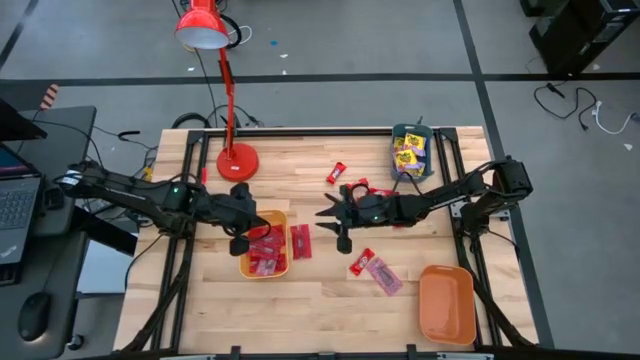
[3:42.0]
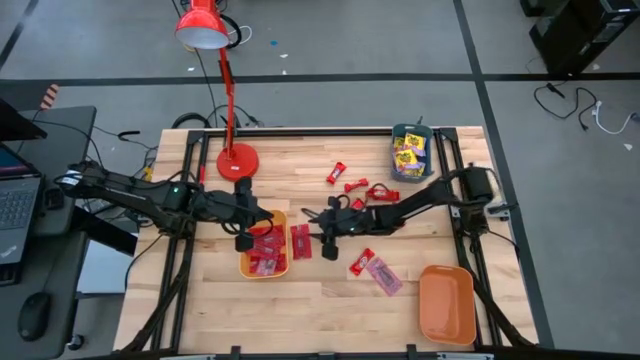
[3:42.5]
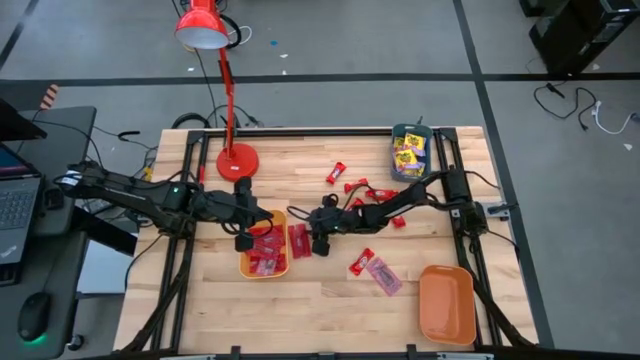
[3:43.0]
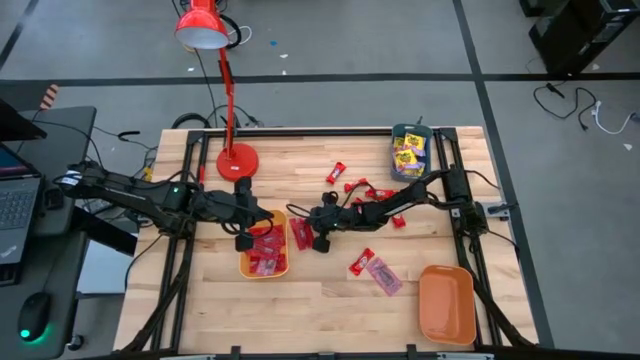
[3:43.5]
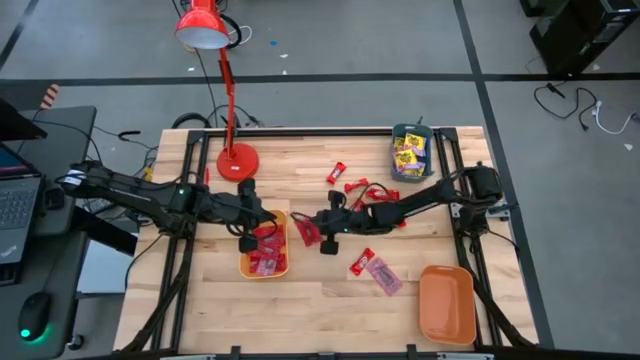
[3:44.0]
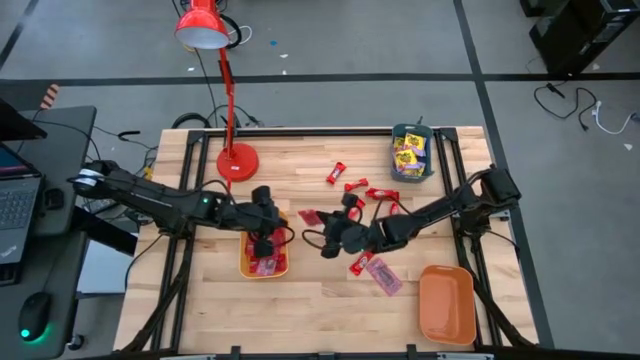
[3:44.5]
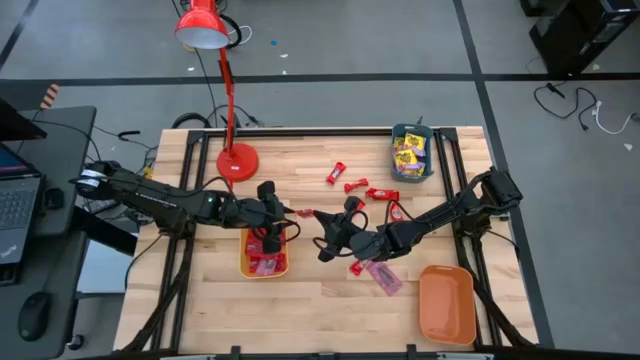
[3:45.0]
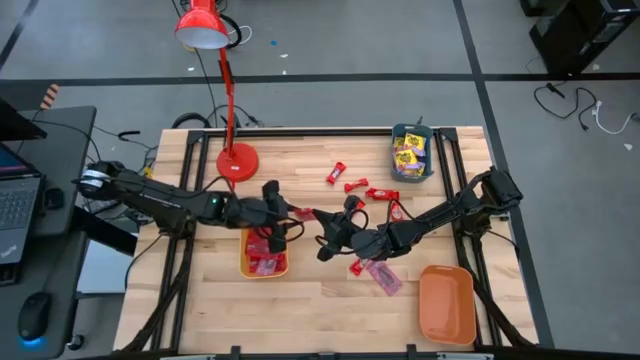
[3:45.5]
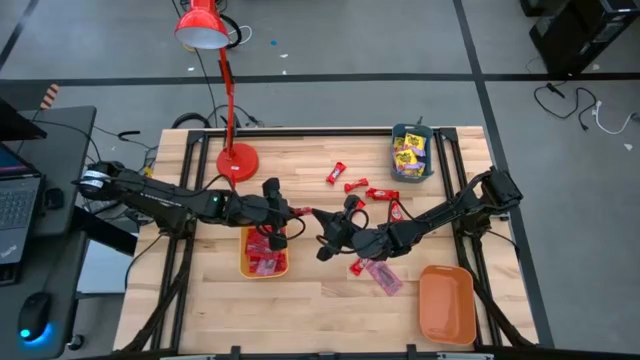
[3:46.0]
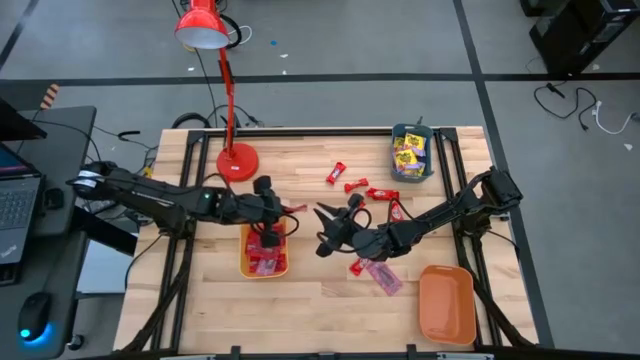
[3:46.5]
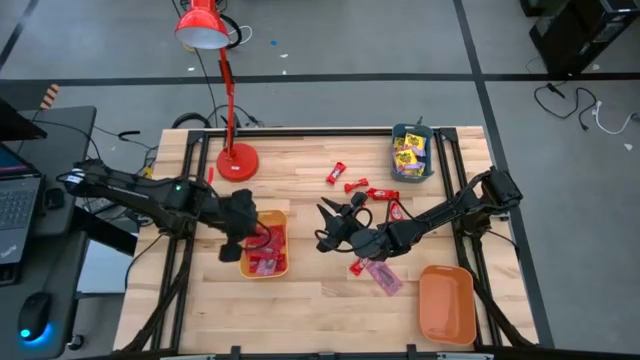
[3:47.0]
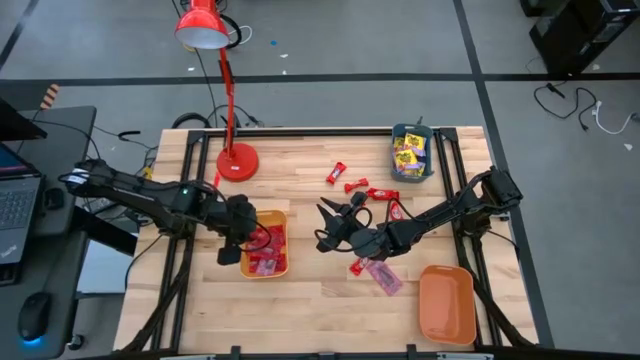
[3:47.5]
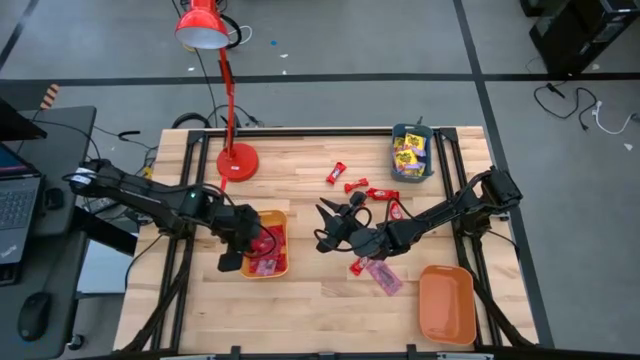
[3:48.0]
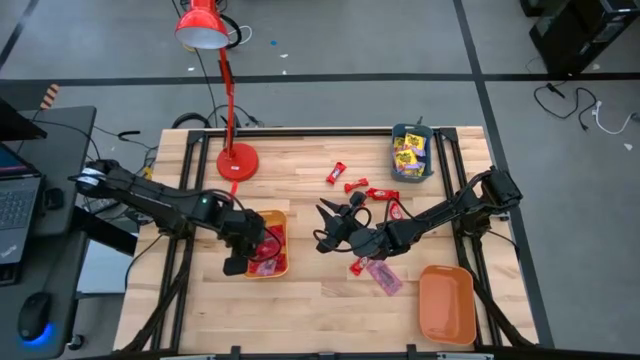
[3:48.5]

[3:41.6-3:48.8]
Task: Sort candy
Put the red candy pack into the yellow bin

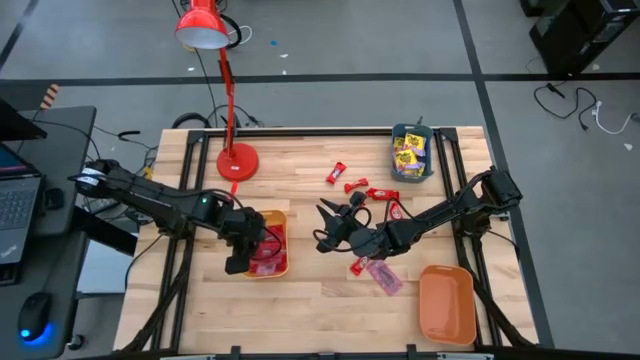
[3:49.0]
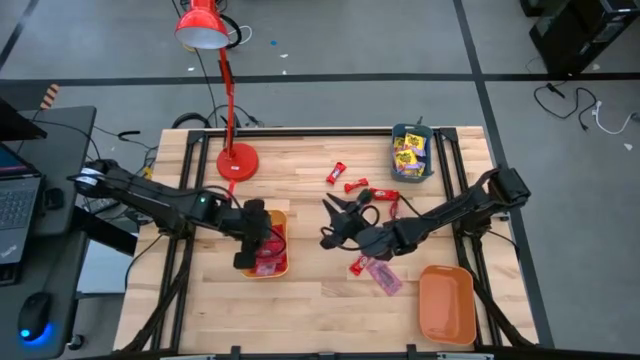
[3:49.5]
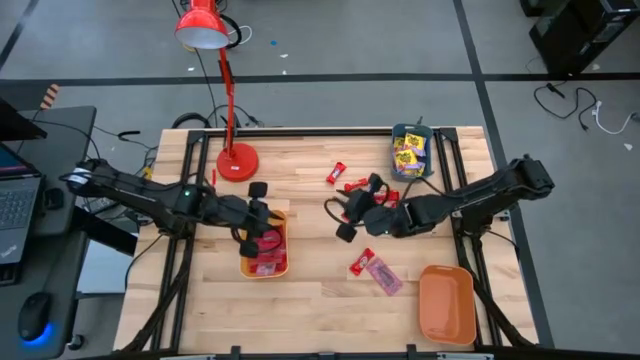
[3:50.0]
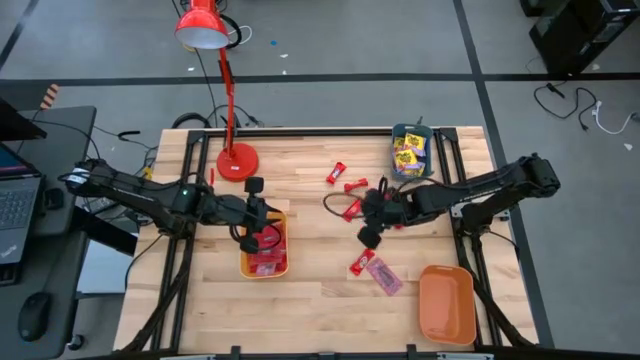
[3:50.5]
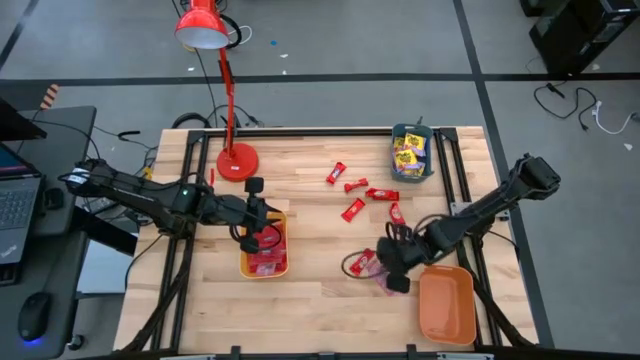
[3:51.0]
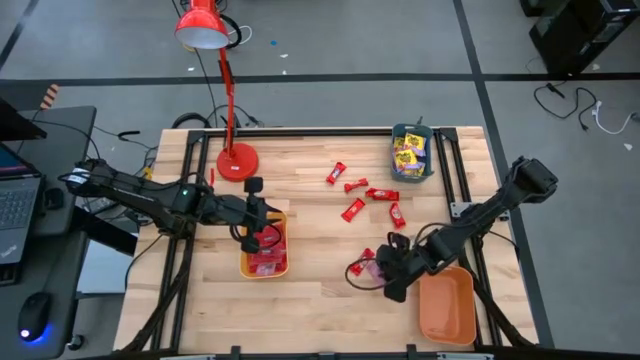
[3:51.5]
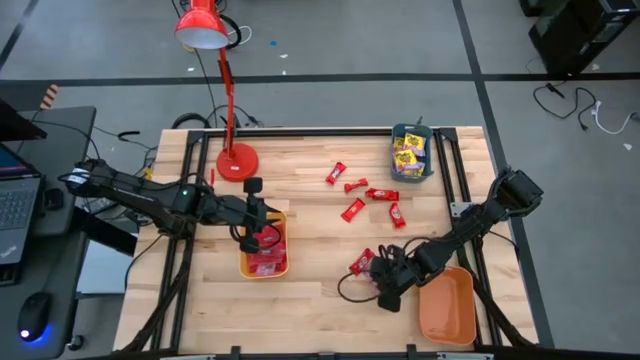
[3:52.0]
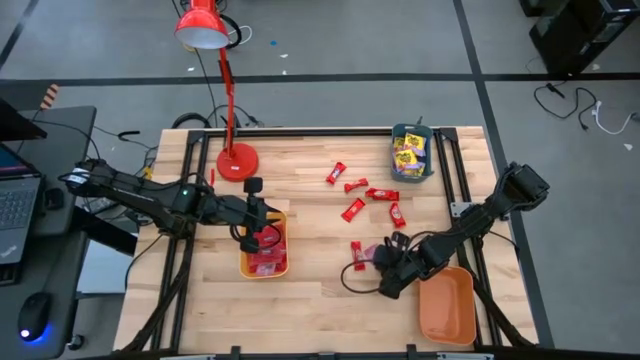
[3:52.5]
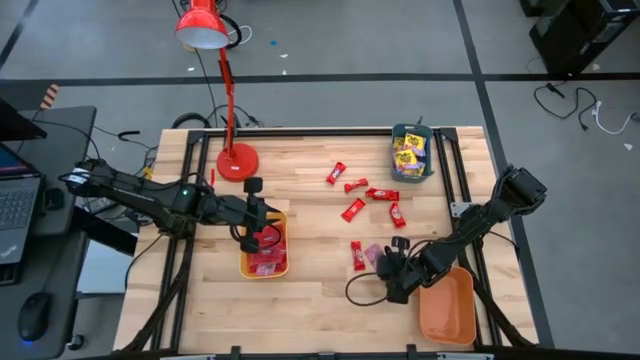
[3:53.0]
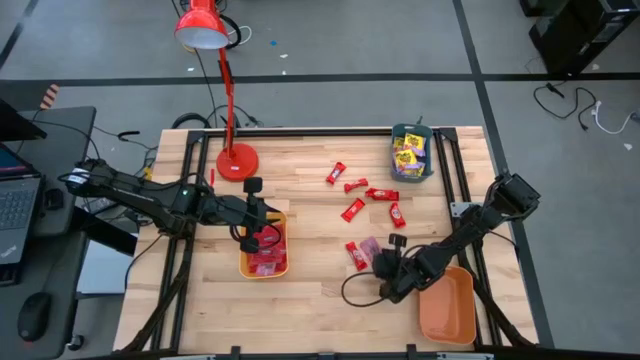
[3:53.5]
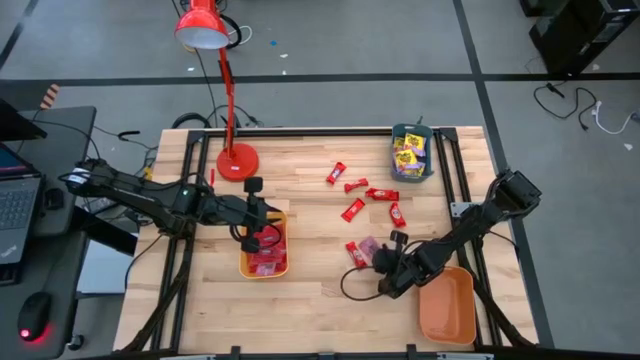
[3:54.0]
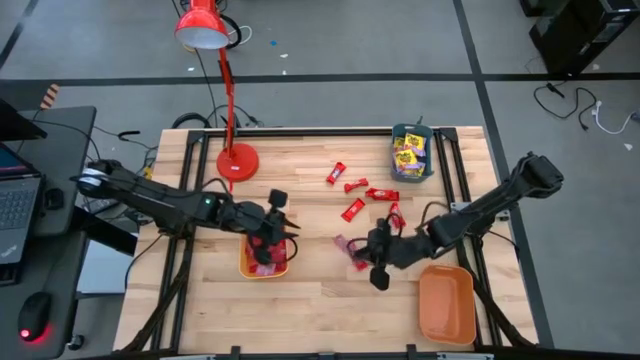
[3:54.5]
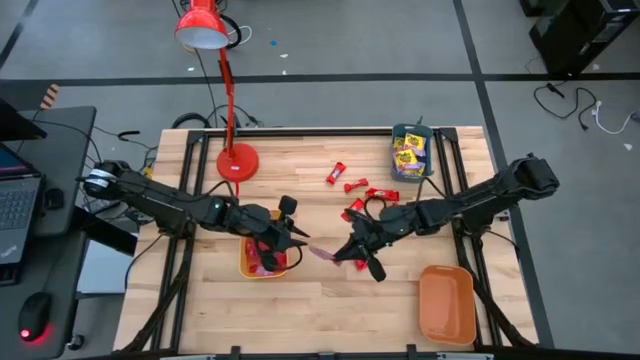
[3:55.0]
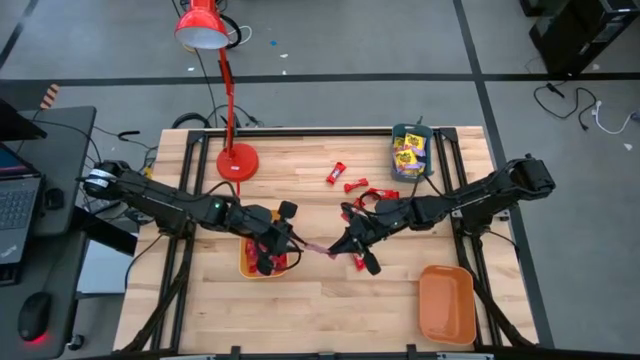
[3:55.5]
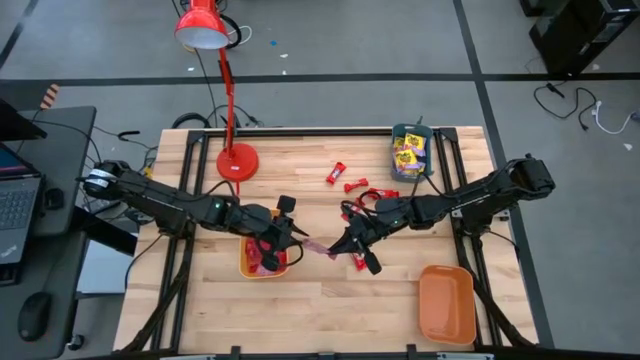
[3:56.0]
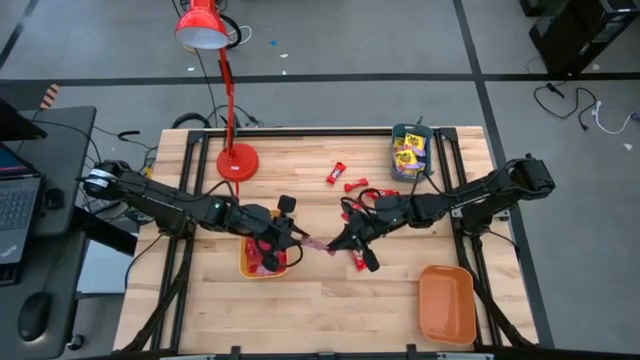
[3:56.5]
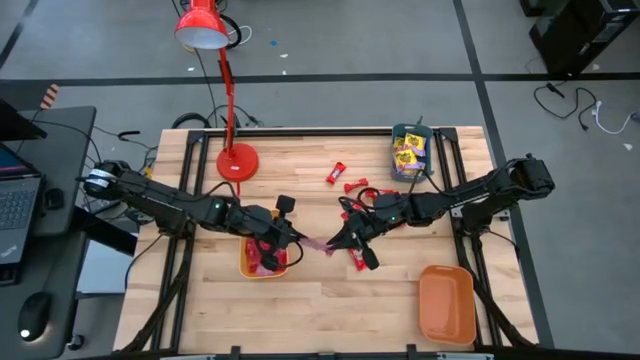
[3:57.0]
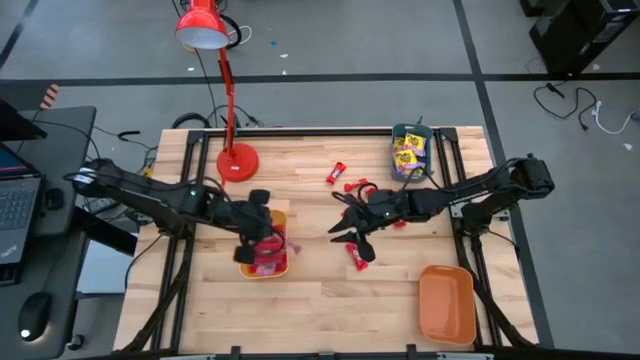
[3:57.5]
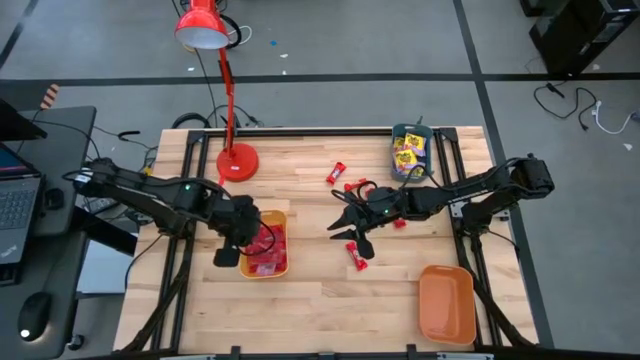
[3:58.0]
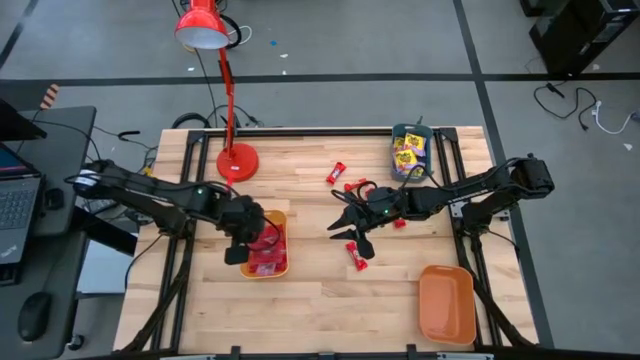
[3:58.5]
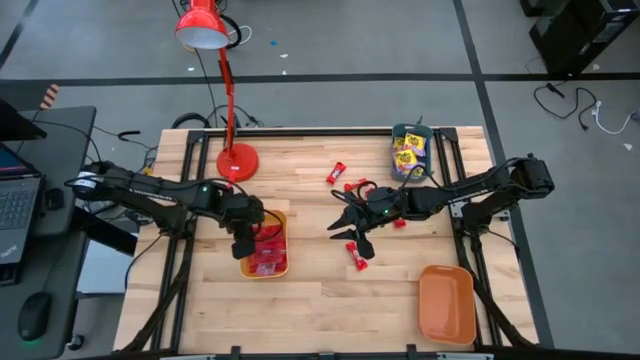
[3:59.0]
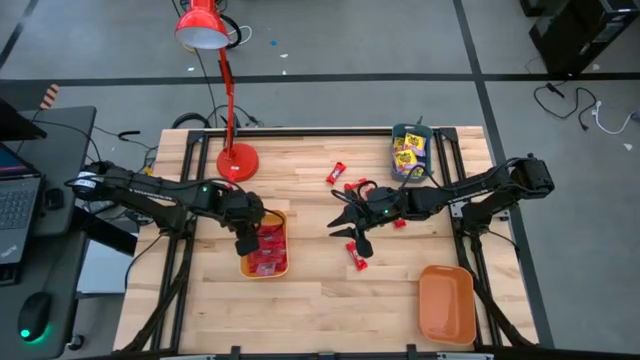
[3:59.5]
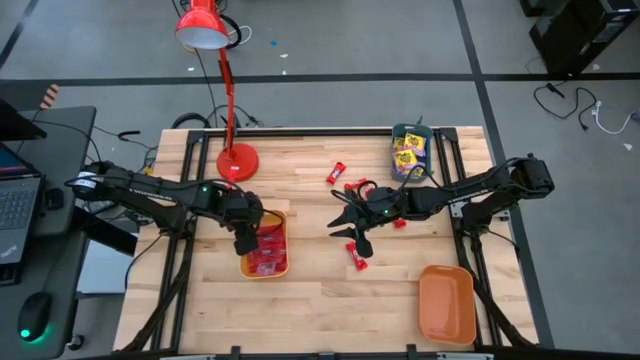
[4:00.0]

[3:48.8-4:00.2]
Put the red candy pack into the yellow bin

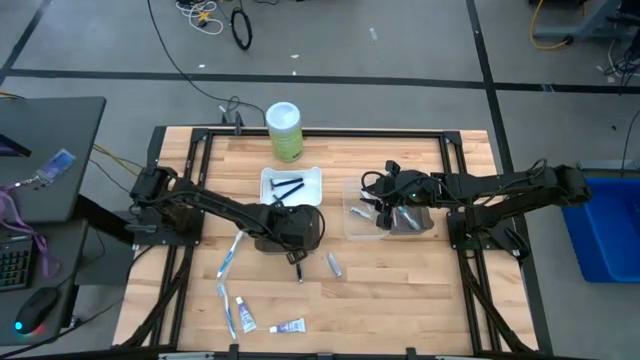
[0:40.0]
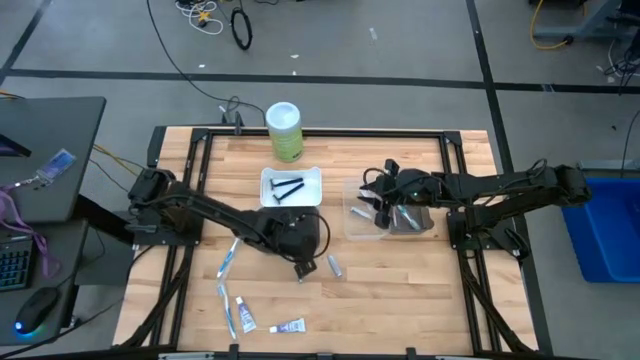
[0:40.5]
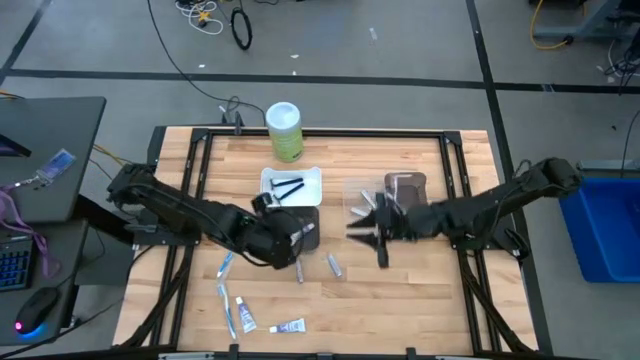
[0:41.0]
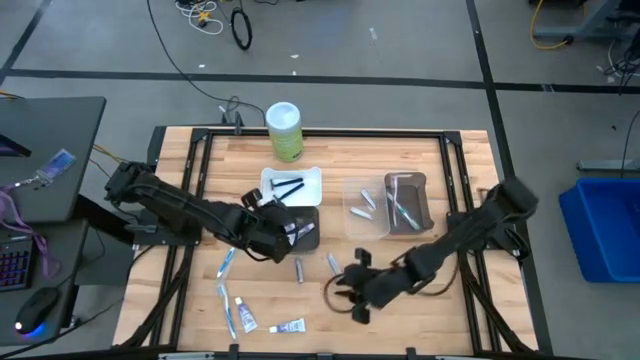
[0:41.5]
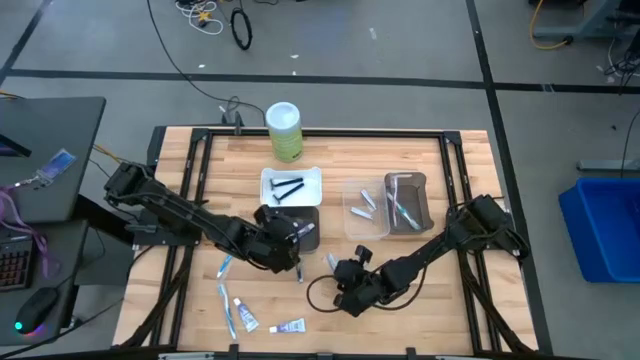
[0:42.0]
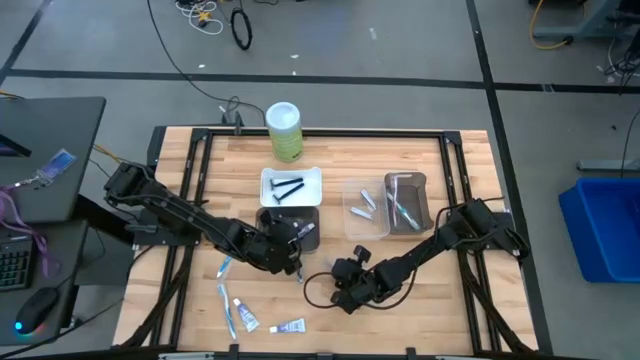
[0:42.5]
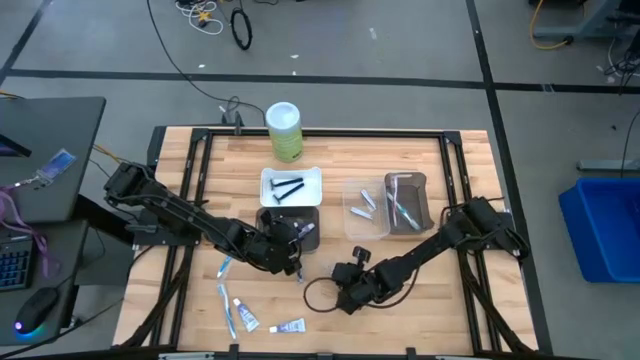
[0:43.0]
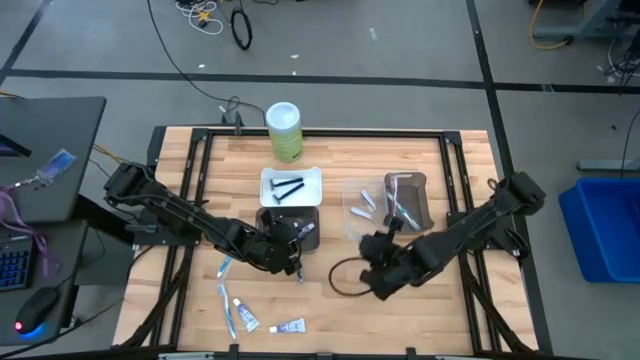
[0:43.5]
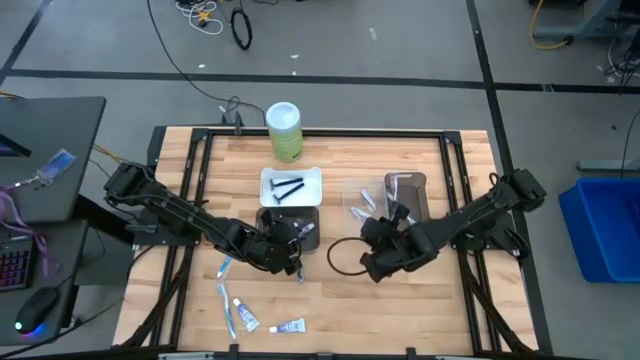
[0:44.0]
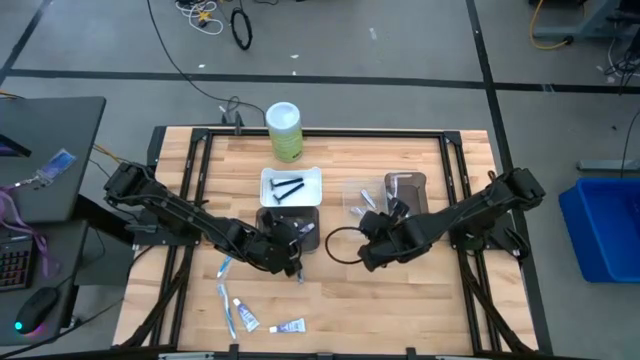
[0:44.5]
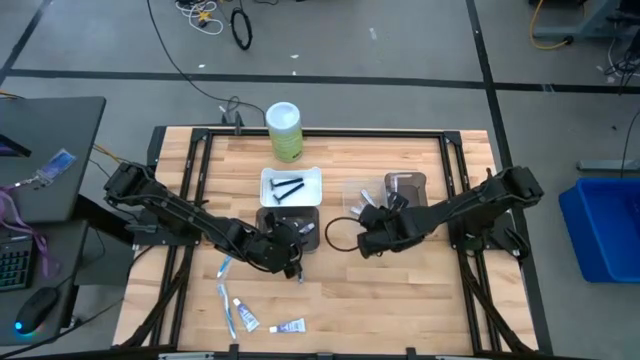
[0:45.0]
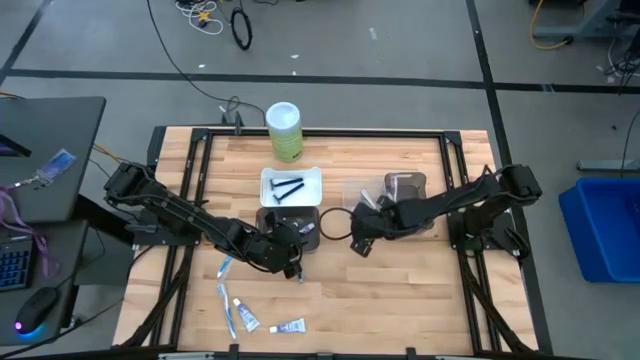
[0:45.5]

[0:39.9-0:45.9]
Task: Pick & Place Travel size toiletries
Put the silver nail cutter into the transparent bin
